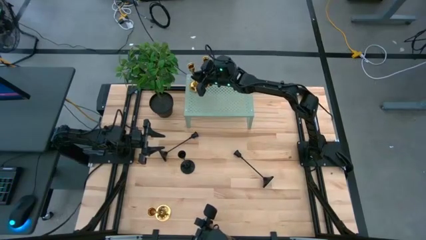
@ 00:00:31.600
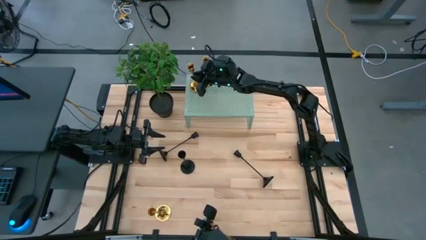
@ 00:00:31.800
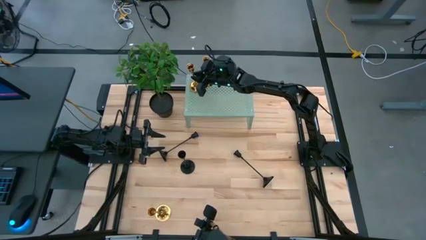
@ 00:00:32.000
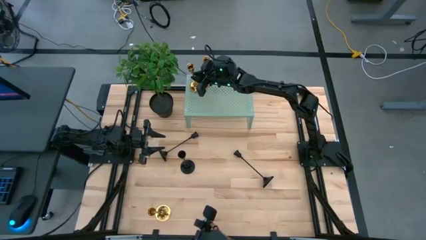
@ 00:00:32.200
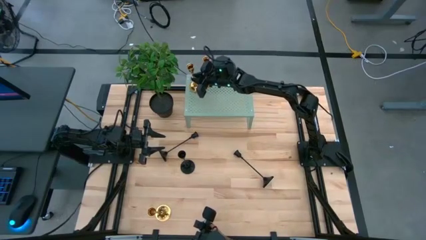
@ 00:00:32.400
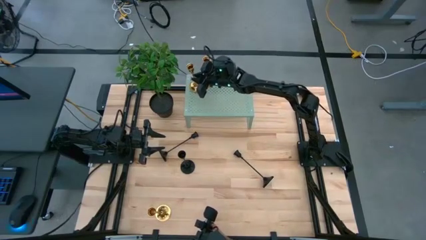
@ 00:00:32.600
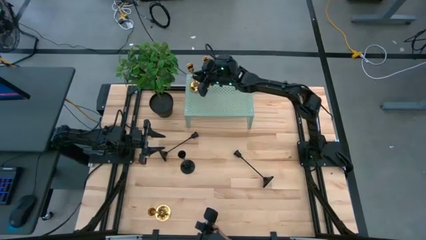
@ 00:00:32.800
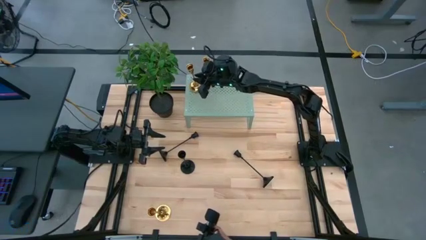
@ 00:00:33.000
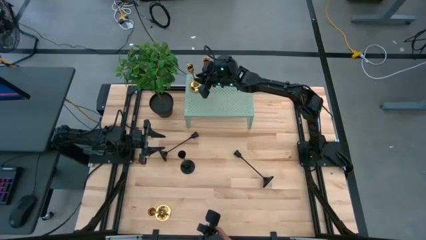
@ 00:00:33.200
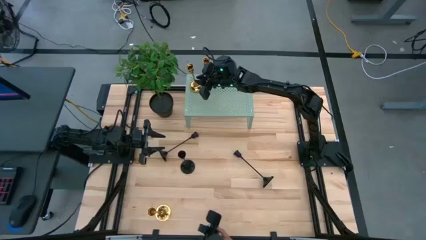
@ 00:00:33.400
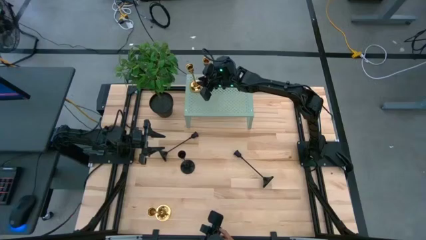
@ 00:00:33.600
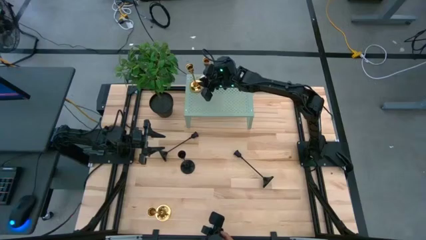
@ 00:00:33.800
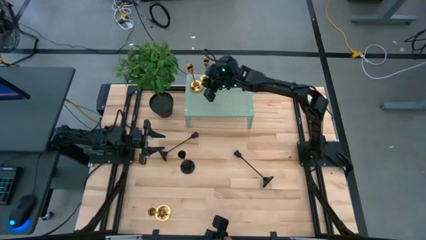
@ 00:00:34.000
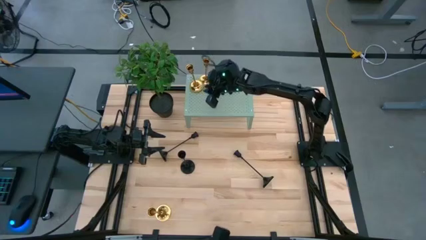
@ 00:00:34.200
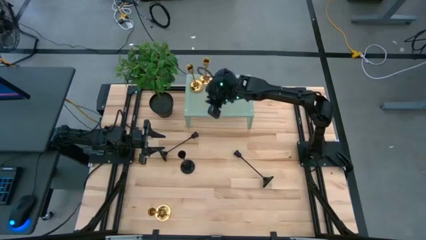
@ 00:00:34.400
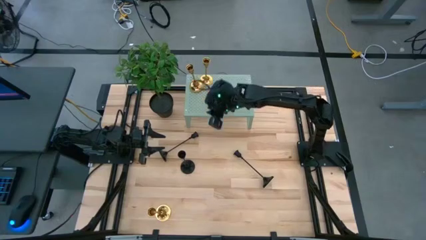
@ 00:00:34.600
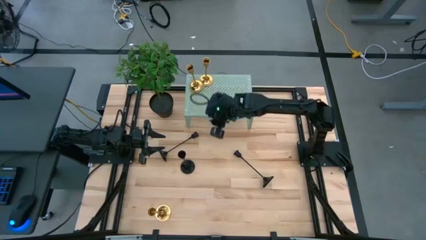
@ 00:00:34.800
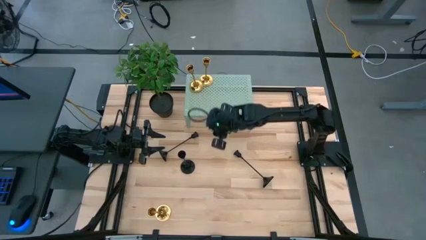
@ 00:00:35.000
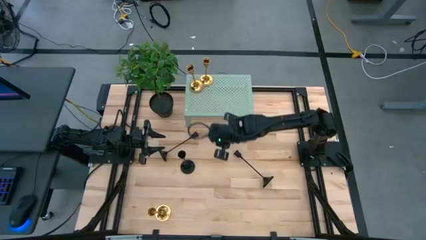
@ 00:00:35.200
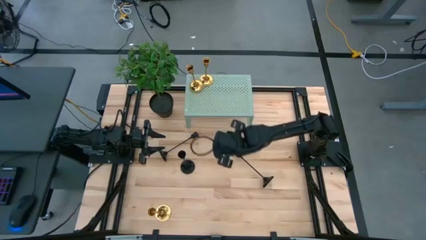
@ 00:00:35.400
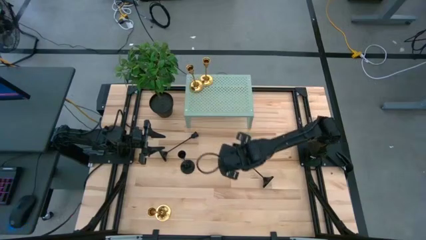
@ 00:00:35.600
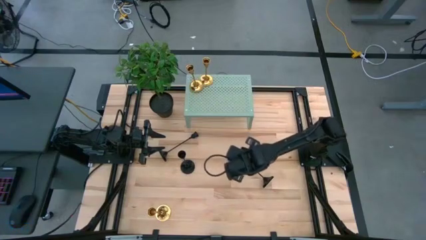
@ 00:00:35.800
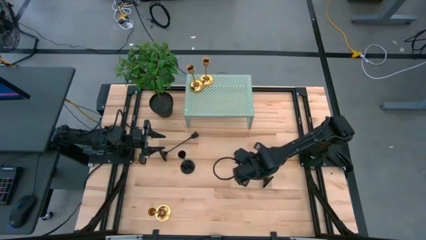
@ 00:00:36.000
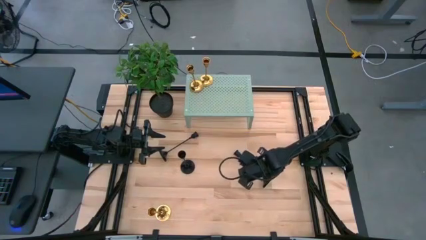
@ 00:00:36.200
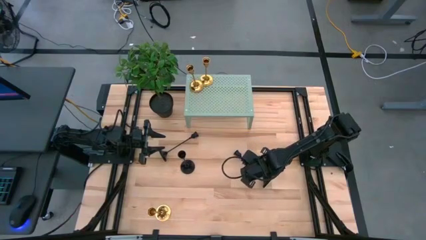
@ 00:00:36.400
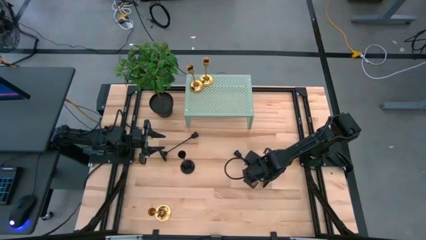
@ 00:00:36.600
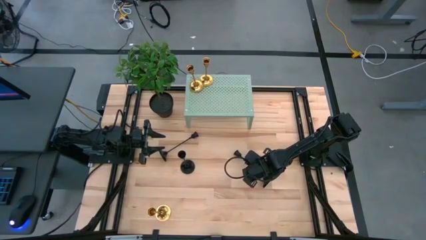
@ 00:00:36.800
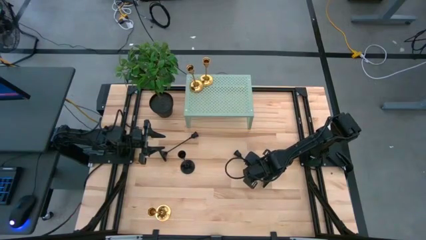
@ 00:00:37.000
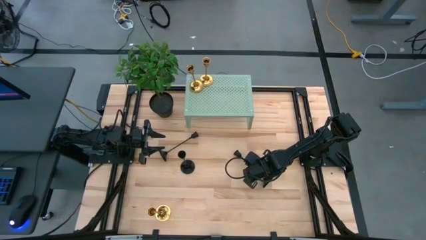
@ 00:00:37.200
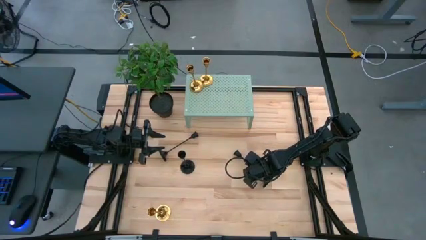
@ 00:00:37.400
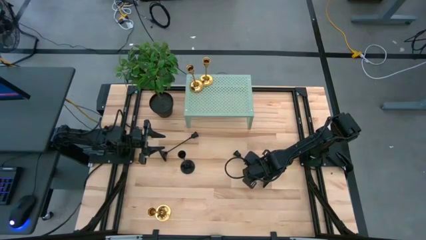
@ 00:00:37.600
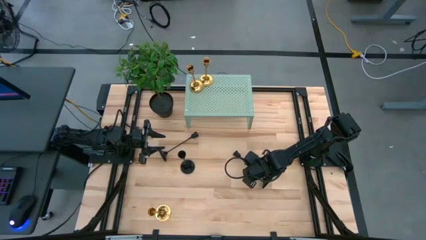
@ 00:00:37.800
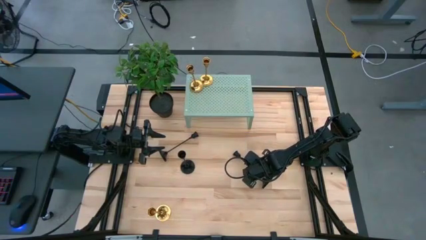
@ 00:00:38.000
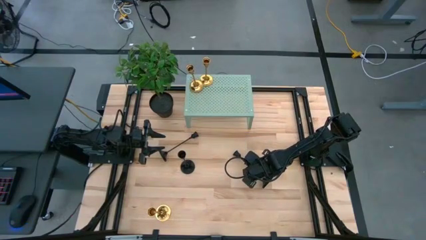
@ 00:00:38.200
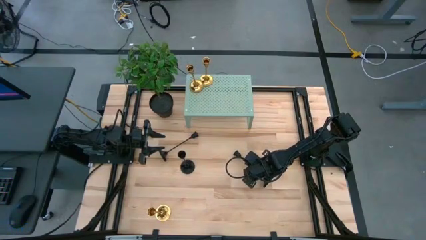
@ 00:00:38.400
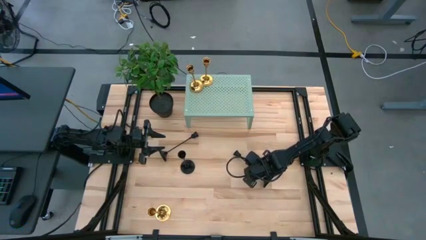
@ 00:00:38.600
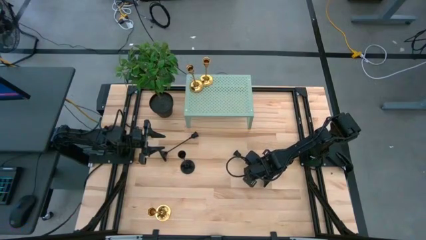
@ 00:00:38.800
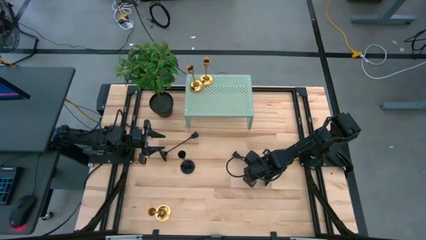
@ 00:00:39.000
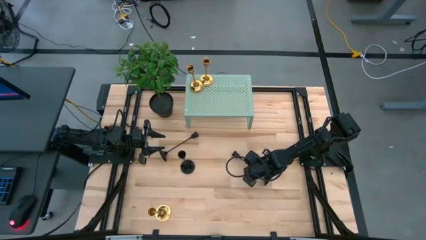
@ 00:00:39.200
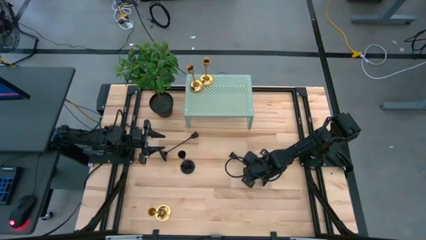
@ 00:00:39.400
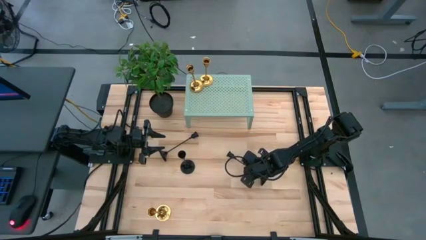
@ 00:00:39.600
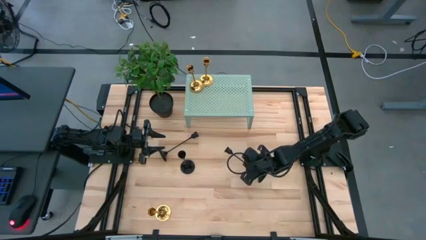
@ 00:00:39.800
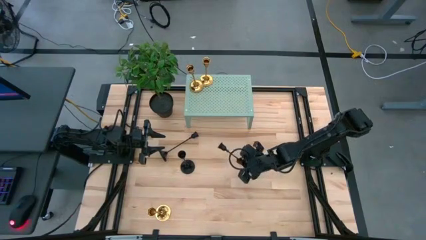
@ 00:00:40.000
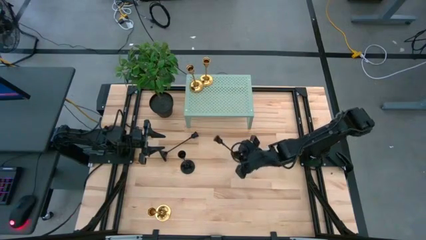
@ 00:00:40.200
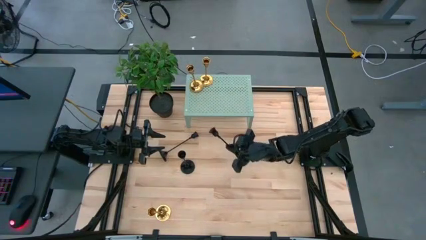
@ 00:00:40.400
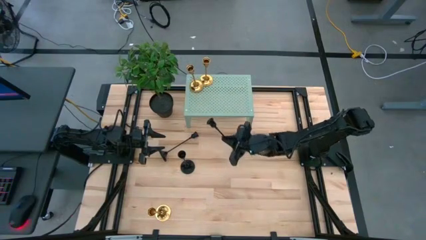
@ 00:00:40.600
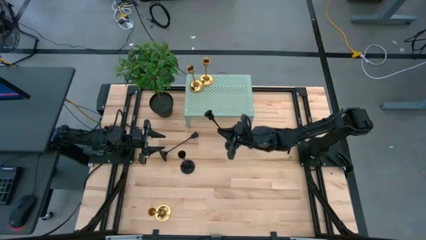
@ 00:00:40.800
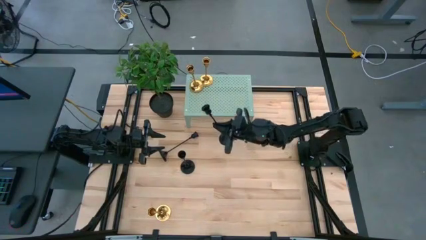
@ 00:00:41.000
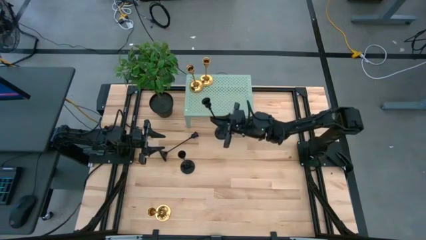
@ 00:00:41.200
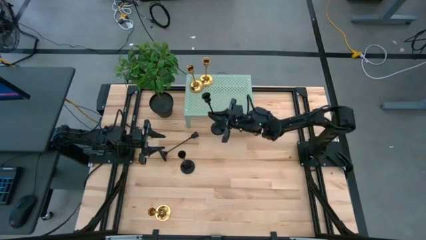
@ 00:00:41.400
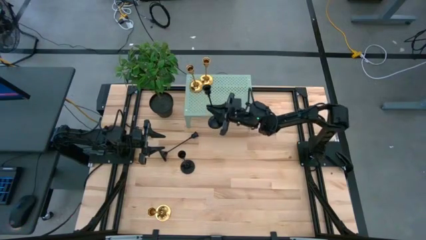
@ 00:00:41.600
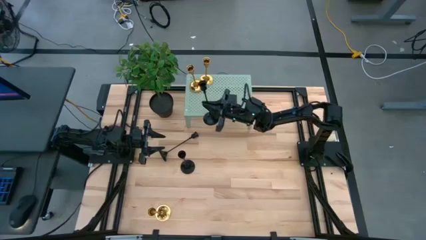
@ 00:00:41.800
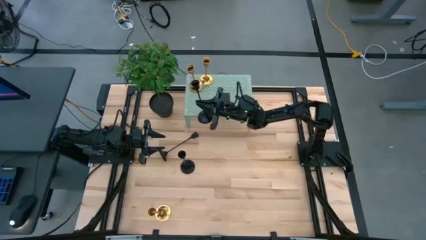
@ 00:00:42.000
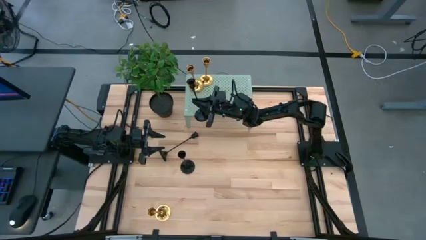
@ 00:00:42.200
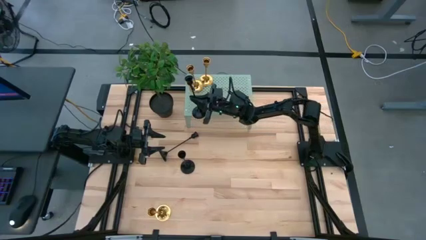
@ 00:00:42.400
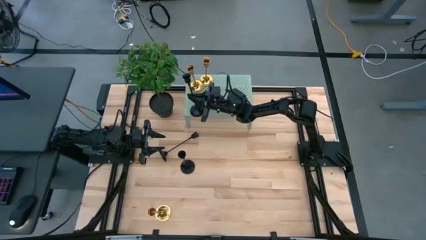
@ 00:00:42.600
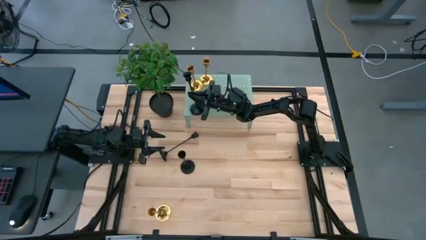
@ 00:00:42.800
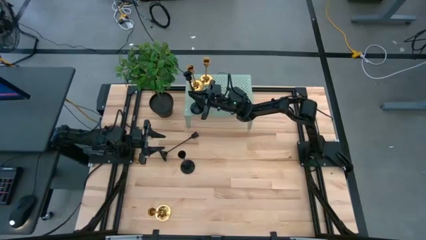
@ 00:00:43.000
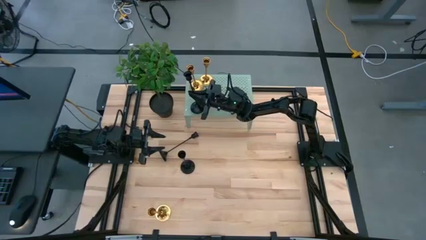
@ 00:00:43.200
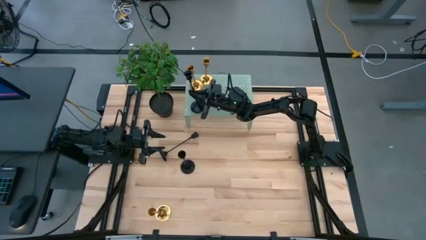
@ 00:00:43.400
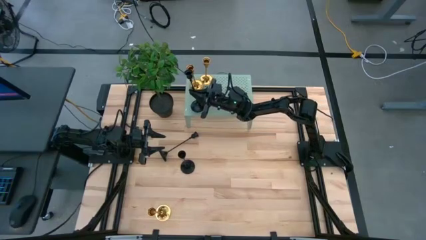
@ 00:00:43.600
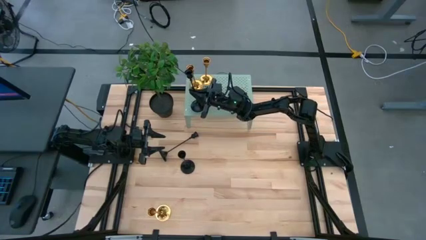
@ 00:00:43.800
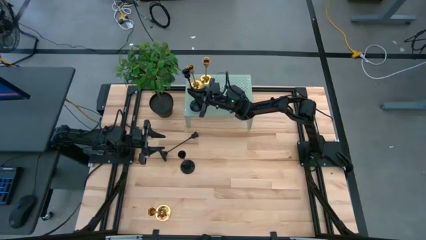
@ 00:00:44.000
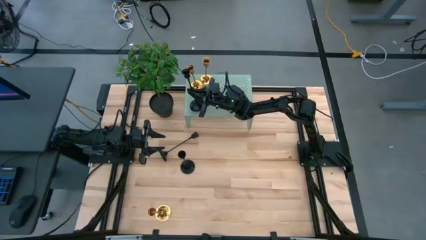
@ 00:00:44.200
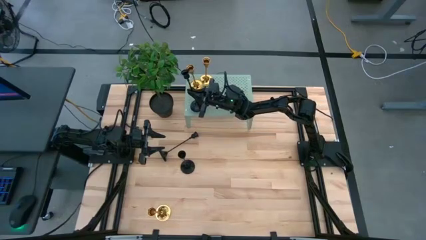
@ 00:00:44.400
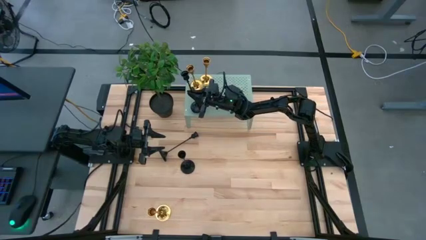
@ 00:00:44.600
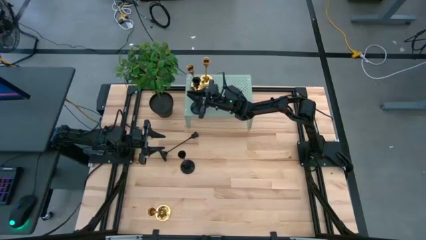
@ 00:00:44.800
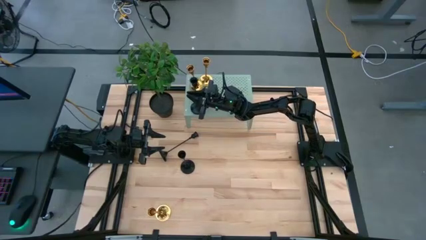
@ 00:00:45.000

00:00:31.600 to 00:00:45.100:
Task: Pick & Place candle stick holders
Put the right black candle holder on the shelf

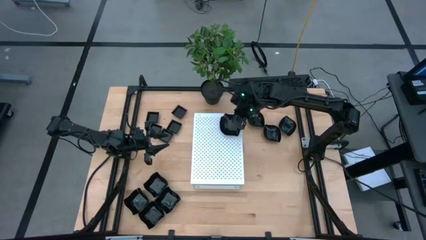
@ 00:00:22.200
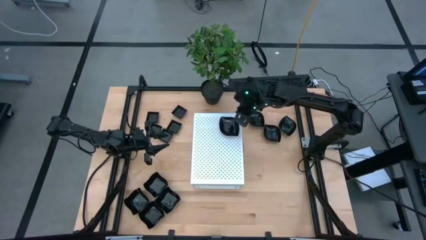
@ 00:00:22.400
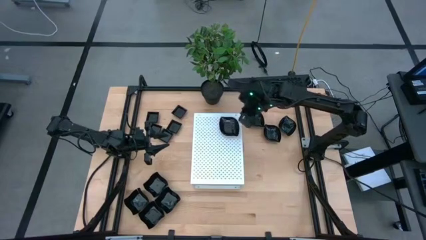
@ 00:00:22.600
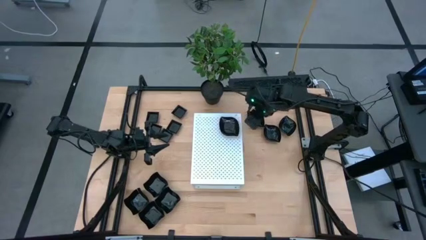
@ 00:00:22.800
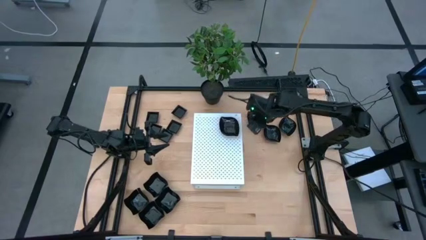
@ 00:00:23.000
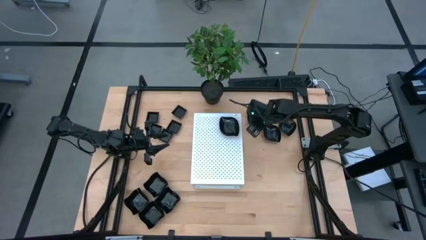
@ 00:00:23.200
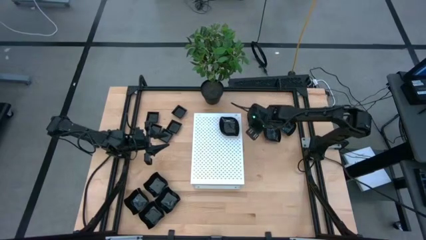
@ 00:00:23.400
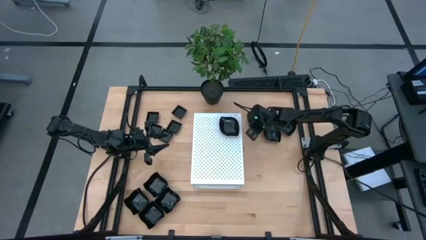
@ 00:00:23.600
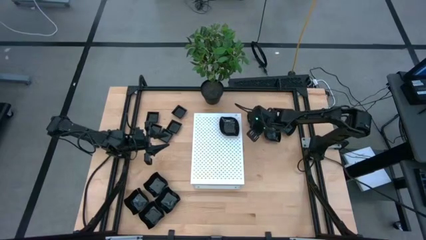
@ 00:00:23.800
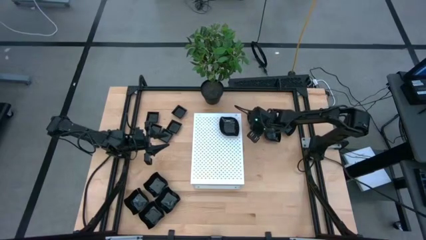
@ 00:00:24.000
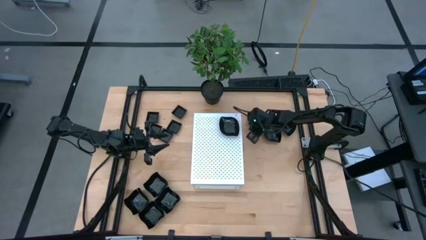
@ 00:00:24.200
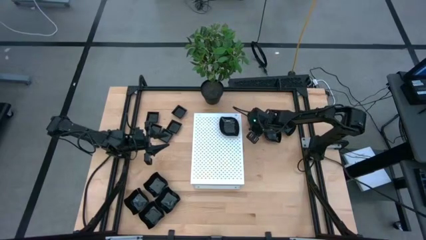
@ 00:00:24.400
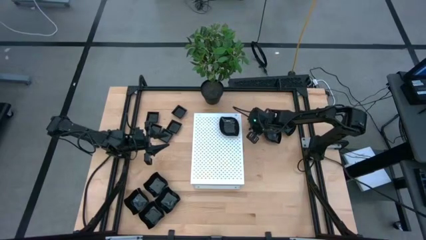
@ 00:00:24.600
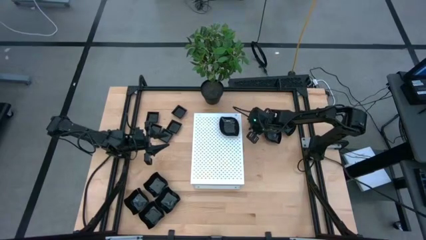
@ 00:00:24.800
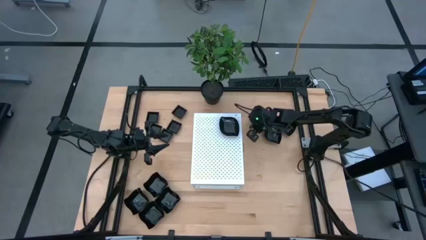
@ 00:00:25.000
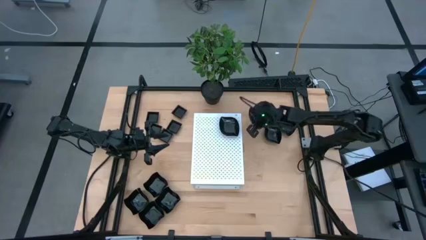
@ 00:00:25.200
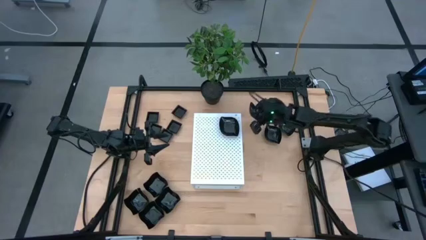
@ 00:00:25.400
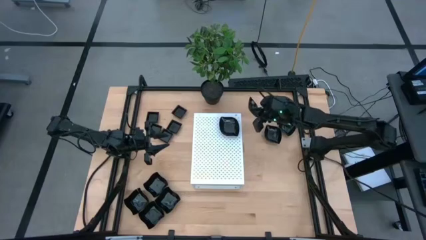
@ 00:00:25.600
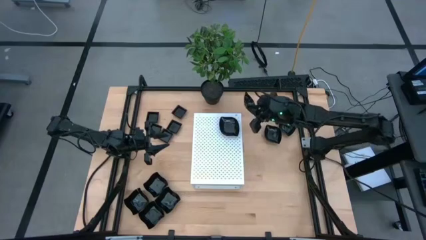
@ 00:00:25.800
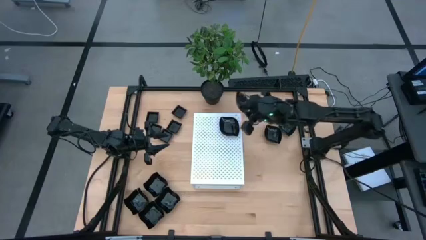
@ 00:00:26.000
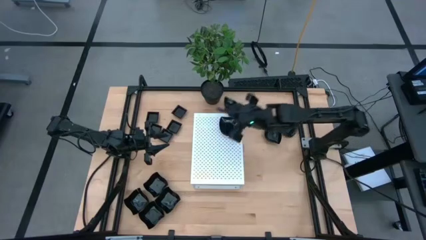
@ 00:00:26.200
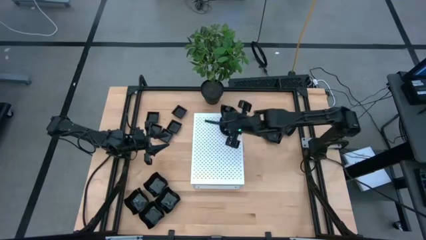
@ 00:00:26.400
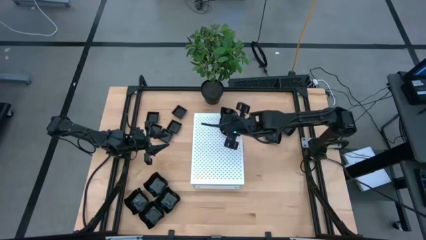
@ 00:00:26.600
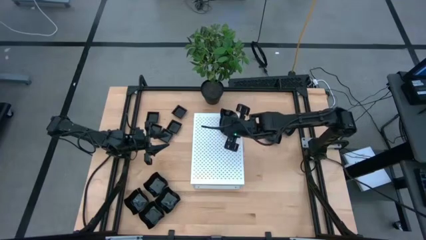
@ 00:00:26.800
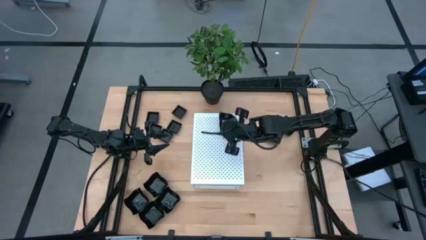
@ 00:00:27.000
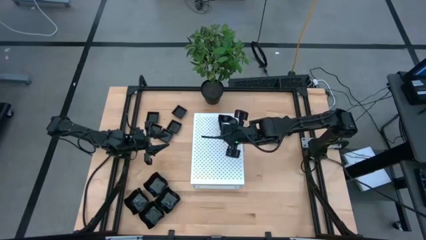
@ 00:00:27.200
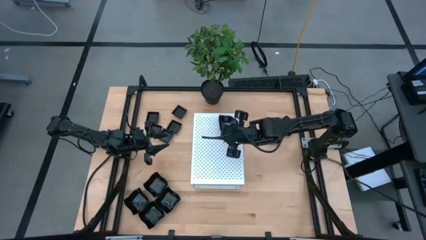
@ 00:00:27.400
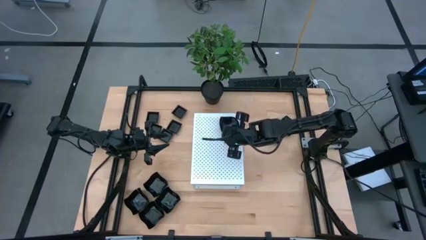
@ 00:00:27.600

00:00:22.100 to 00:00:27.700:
Task: Pick & Place Mini shaped plates
Stack the black leaf shaped plate on top of the black leaf shaped plate on the shelf
